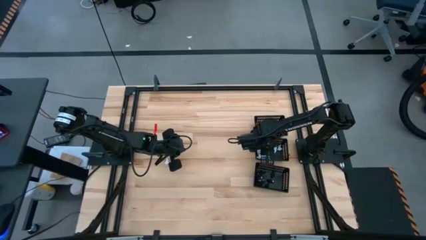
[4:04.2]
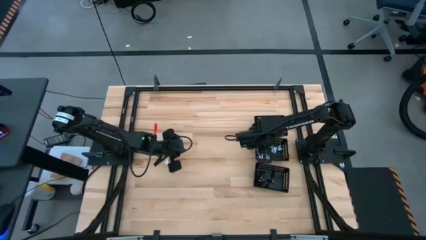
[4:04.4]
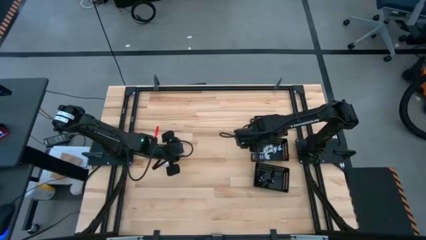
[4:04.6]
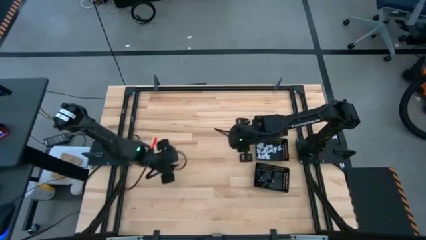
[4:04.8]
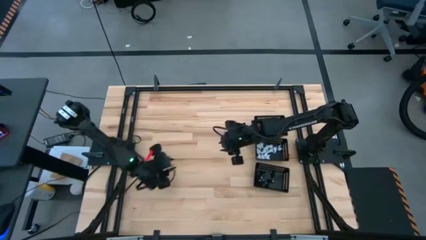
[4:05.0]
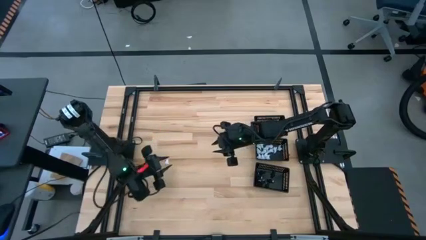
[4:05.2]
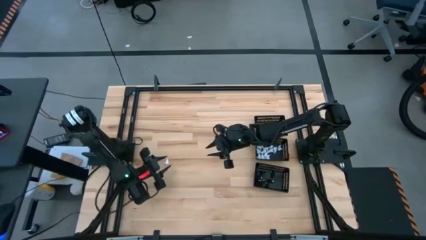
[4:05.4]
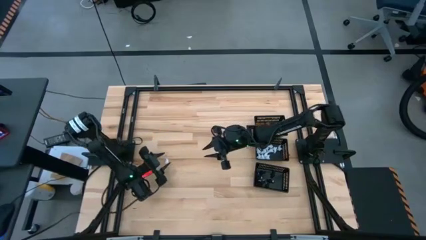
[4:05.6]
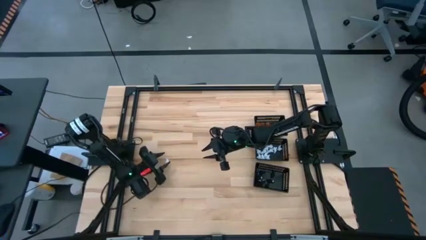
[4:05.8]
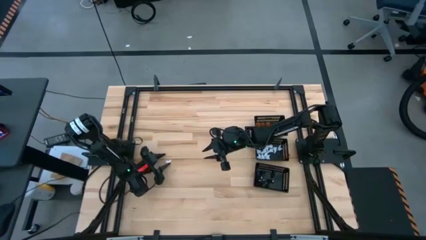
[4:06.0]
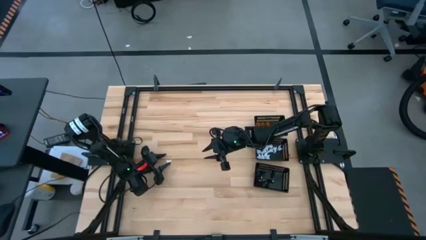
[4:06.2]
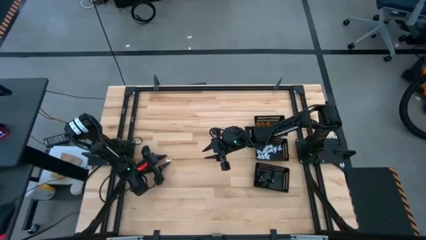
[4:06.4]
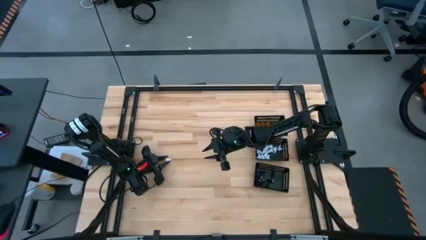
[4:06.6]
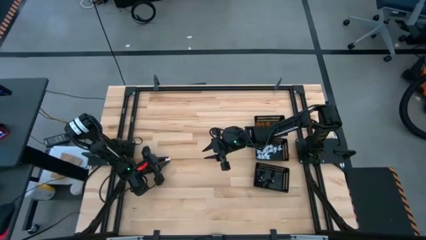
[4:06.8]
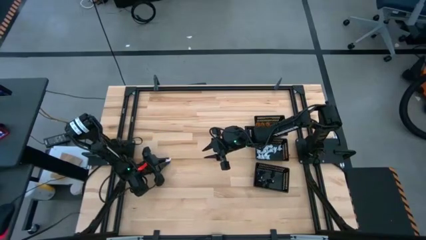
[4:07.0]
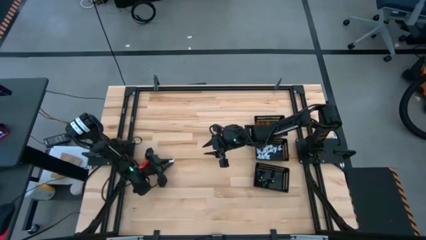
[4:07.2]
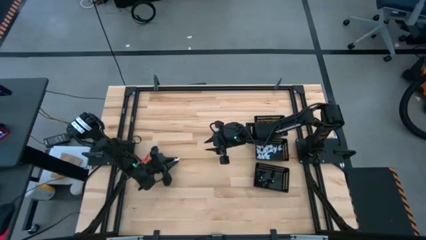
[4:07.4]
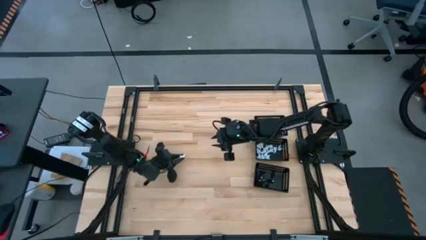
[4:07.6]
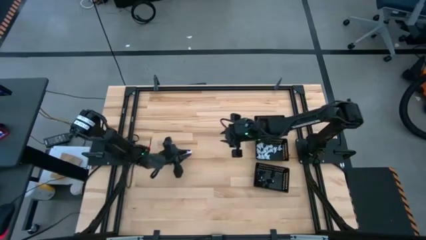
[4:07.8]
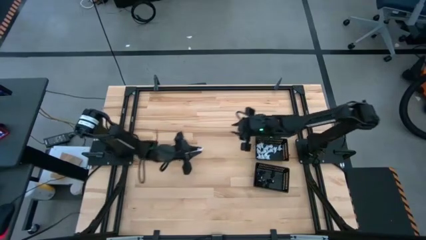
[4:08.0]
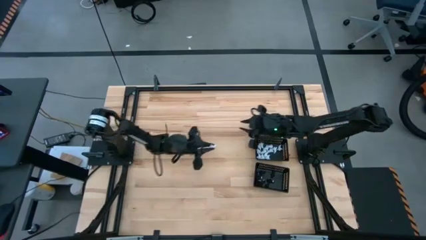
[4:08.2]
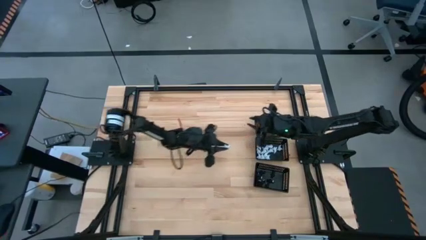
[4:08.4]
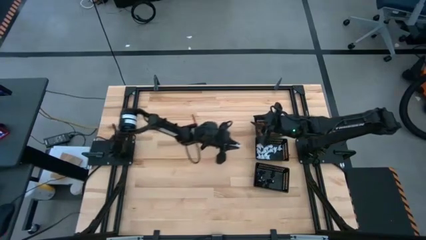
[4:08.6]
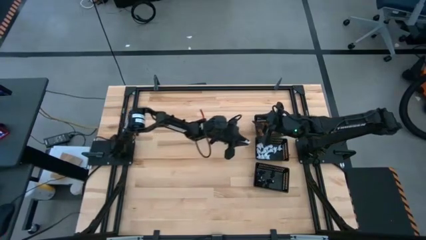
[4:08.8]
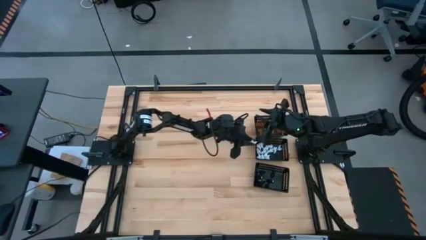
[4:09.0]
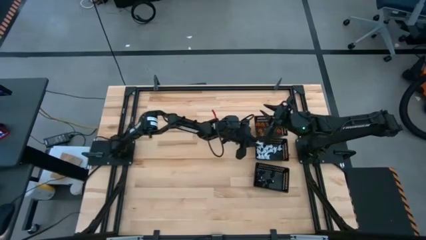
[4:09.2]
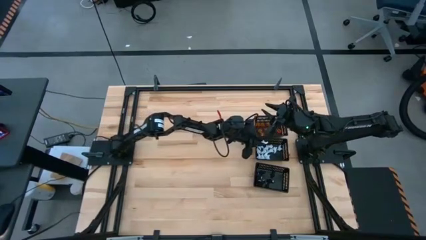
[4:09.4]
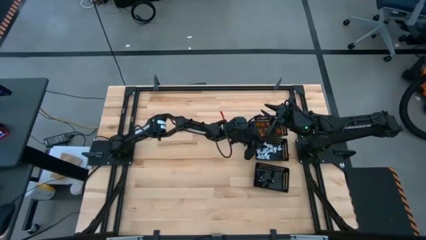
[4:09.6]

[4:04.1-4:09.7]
Task: Sort Halloween decoration
Put the white ghost toy into the center black bin

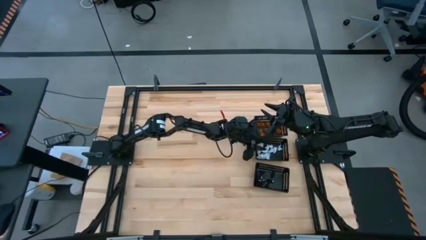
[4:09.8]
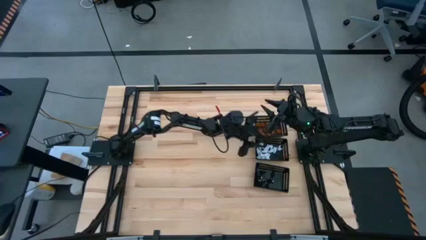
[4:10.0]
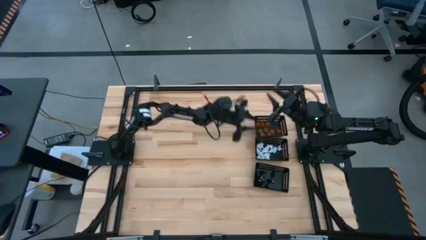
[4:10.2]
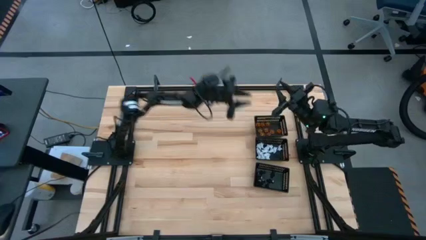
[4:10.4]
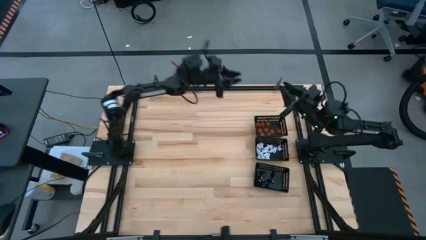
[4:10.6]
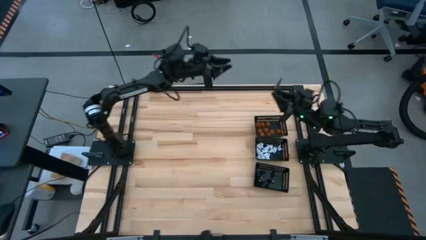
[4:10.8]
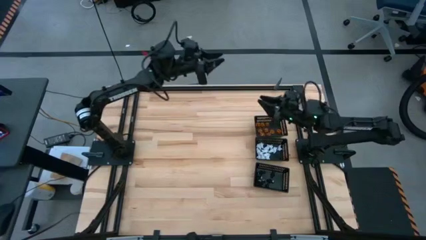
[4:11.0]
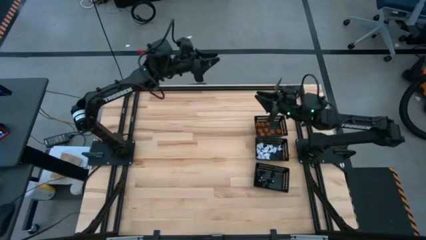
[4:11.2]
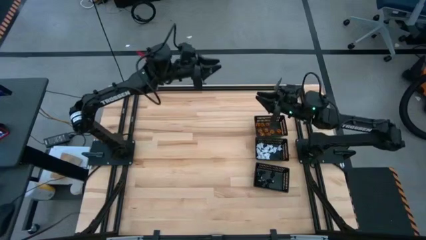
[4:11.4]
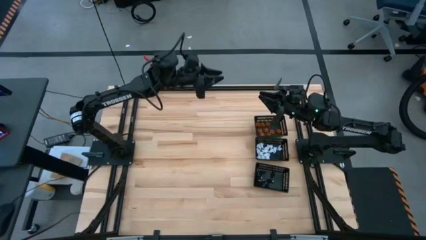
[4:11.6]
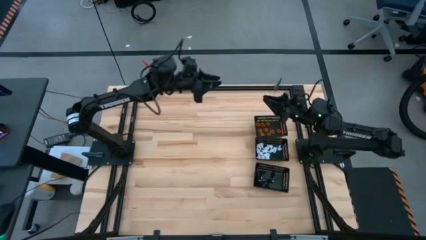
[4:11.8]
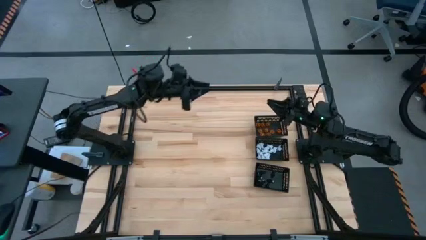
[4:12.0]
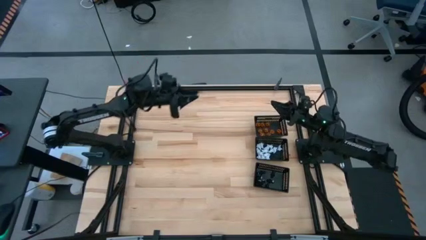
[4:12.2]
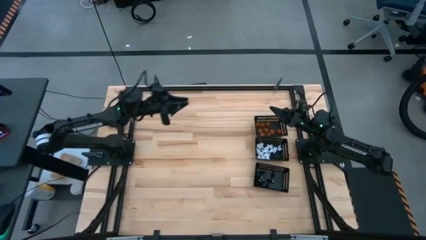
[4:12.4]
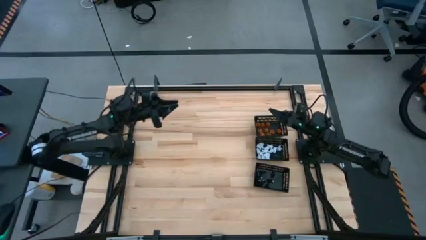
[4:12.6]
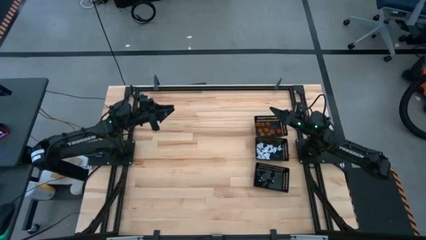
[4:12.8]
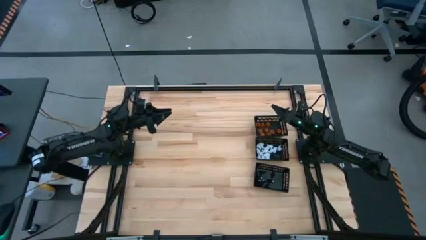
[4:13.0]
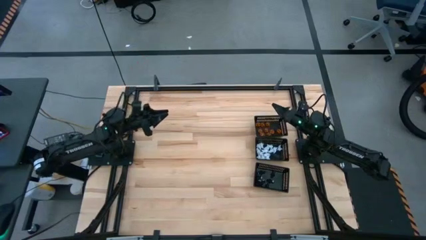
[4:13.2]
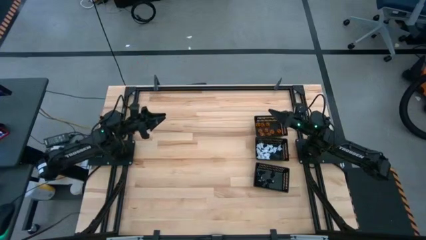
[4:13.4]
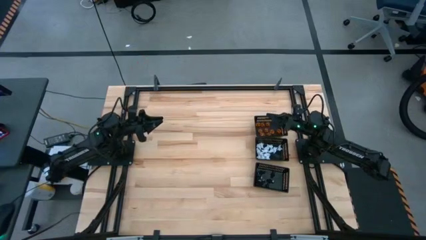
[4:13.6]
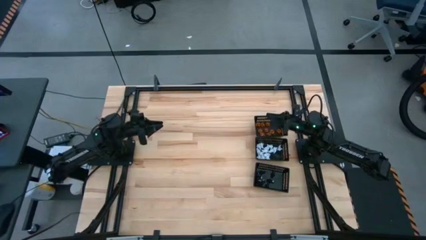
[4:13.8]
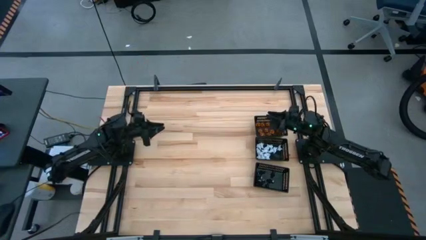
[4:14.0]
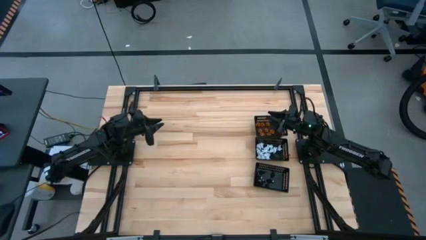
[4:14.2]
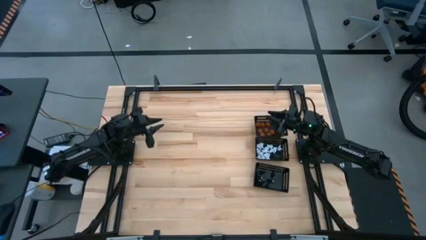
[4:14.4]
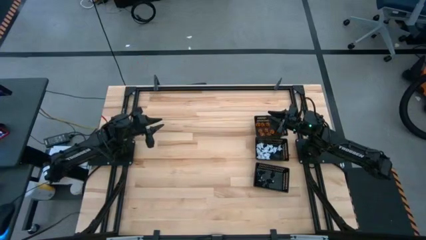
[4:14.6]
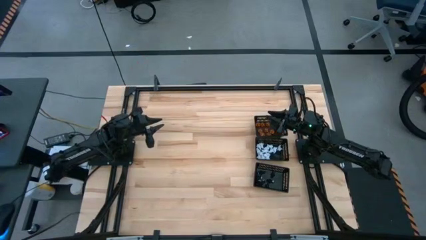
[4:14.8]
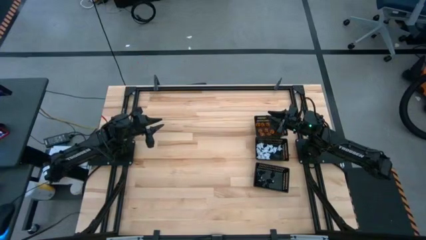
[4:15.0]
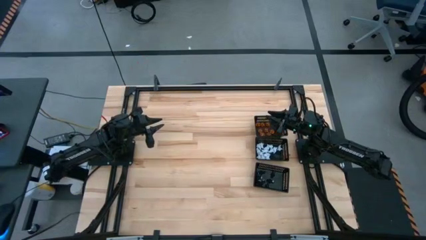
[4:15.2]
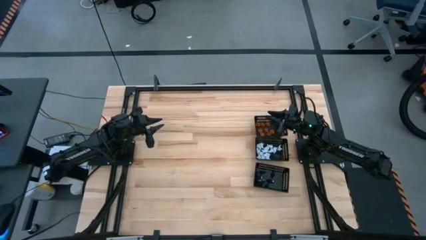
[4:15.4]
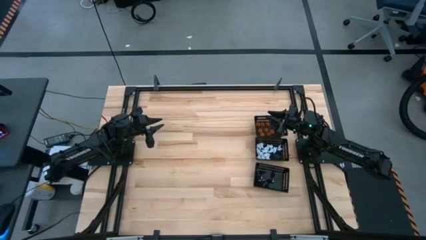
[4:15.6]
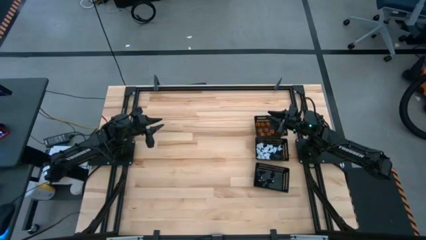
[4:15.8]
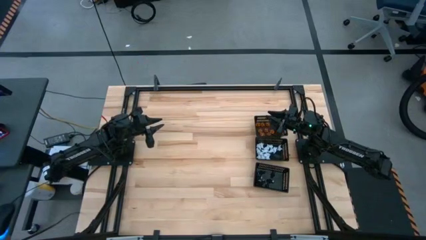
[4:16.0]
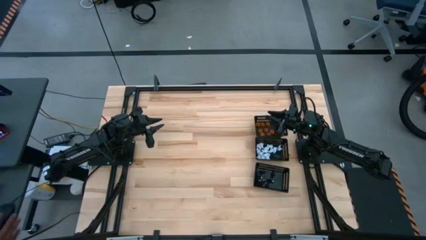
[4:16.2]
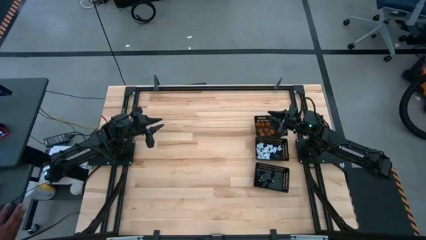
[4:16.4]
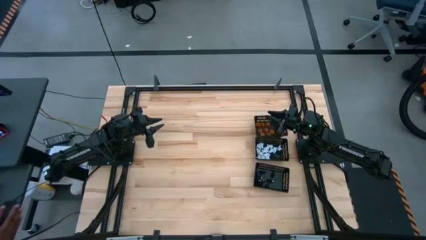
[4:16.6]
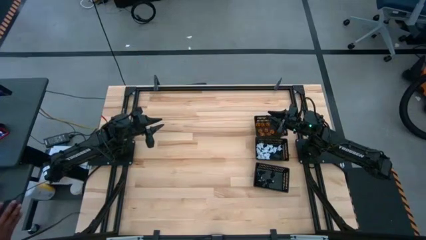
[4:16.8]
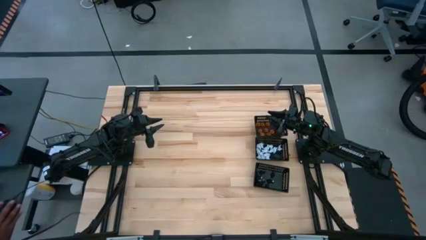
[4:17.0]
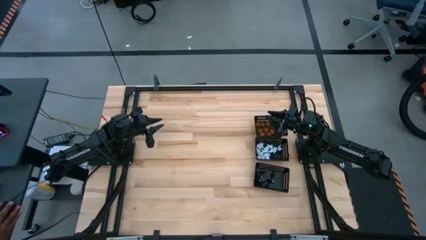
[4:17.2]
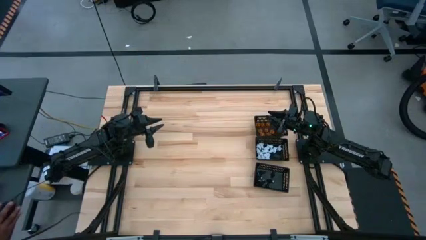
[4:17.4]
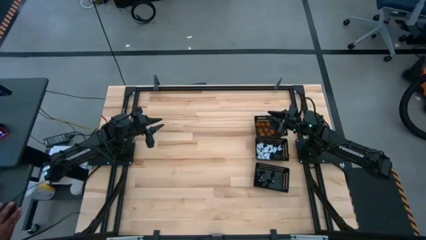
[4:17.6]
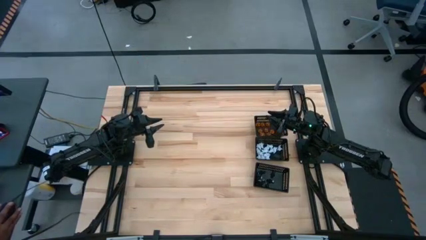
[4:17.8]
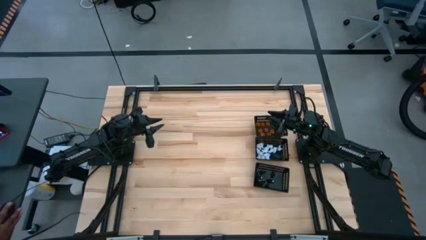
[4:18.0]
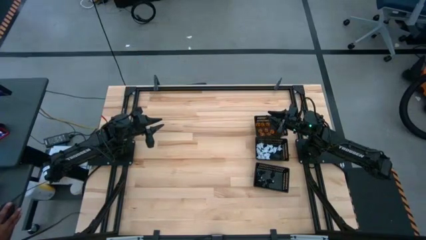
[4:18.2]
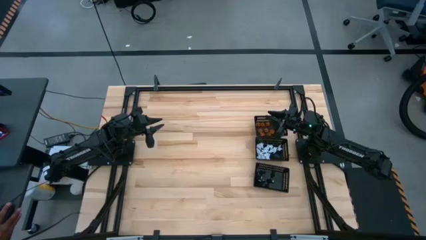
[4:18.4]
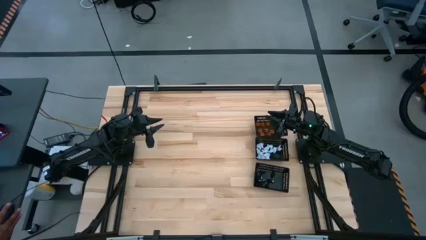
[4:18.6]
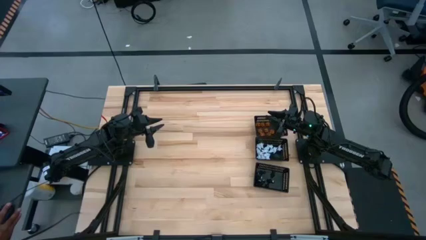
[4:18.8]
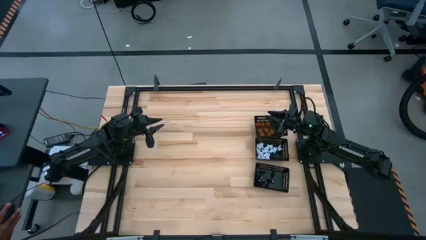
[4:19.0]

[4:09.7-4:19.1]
Return to Home Position
